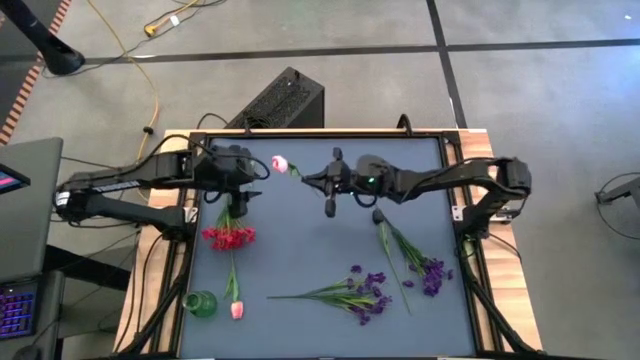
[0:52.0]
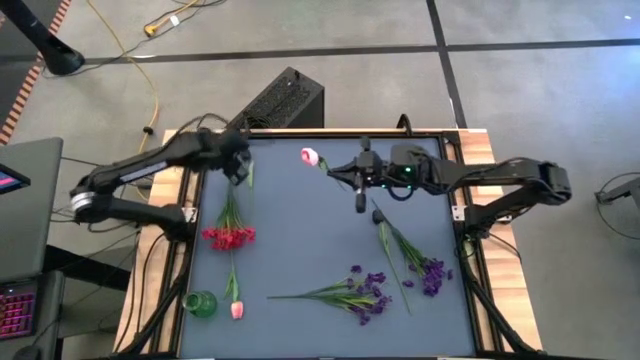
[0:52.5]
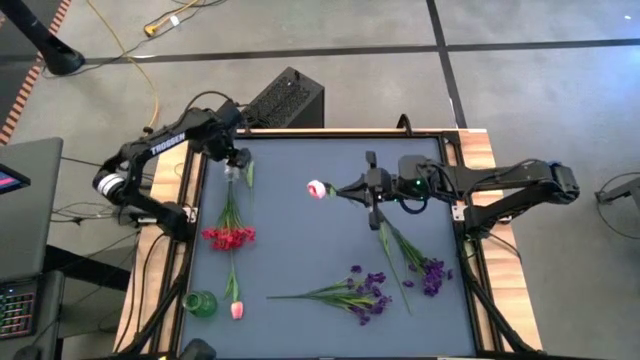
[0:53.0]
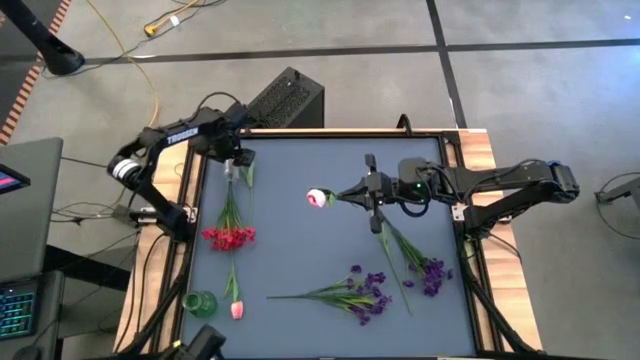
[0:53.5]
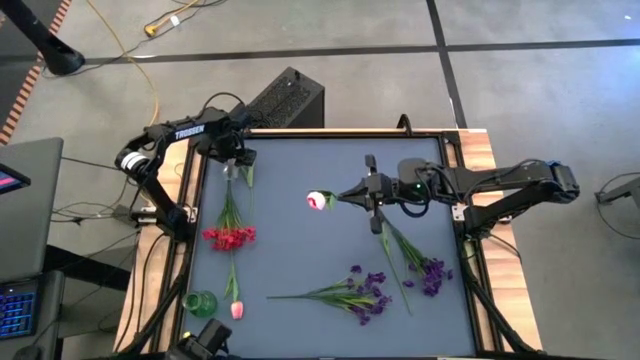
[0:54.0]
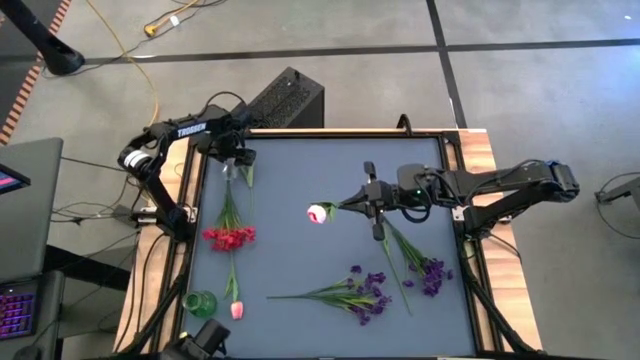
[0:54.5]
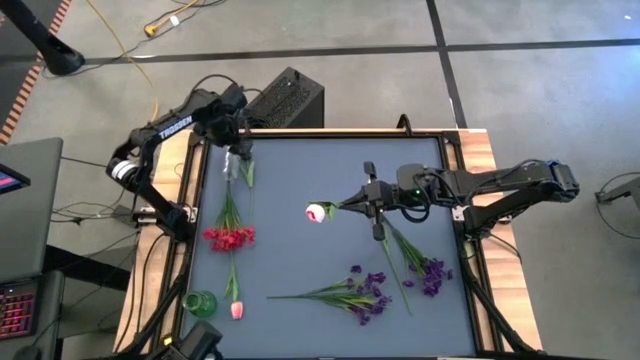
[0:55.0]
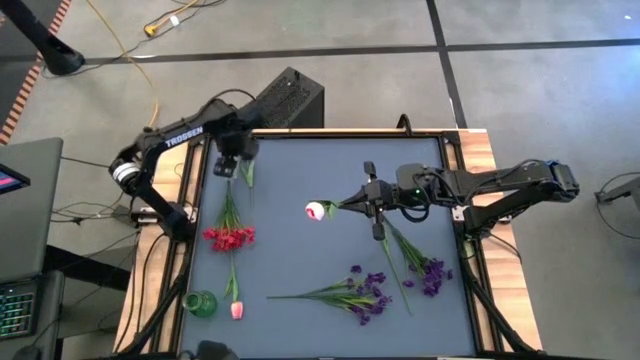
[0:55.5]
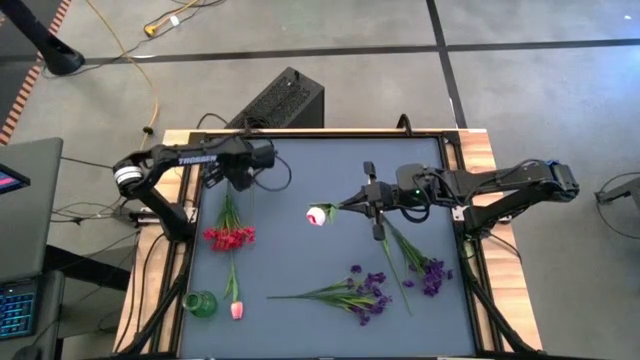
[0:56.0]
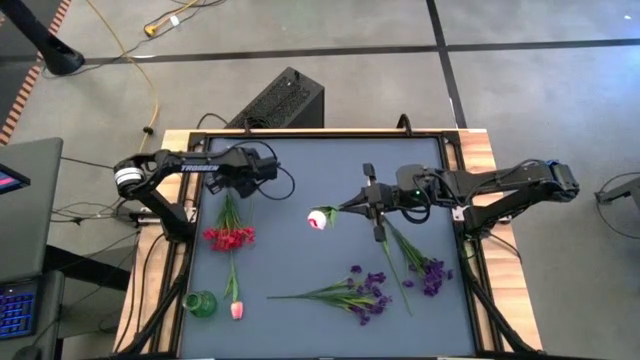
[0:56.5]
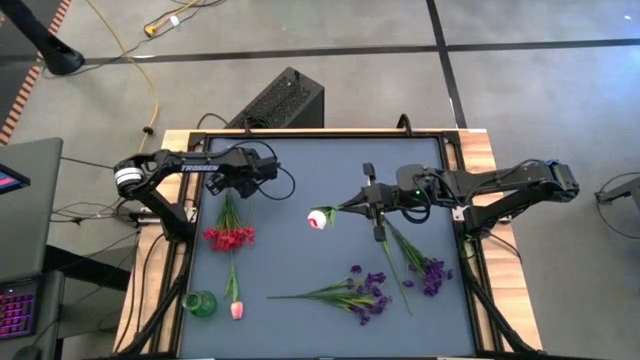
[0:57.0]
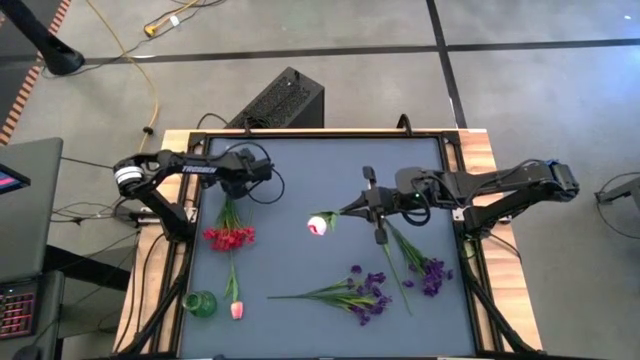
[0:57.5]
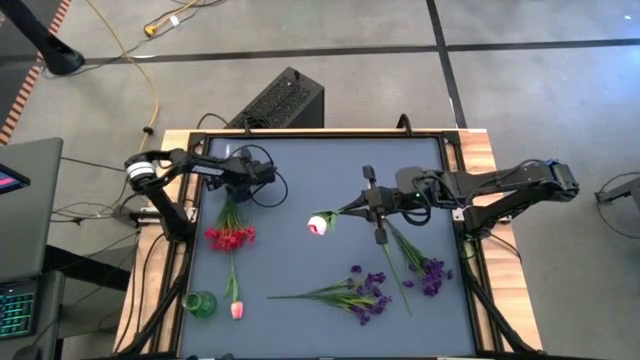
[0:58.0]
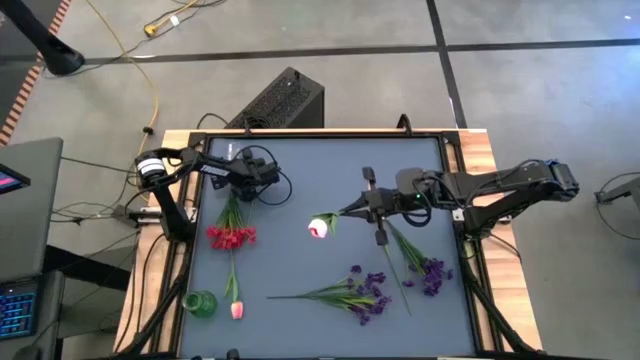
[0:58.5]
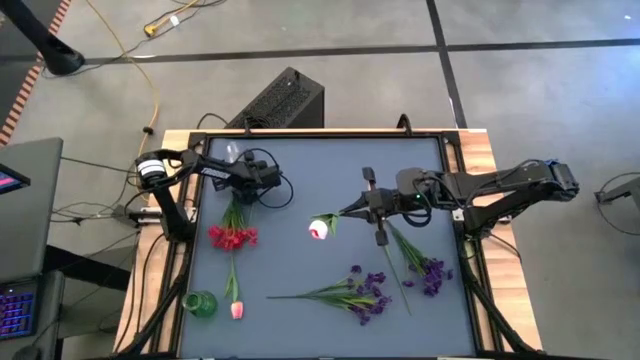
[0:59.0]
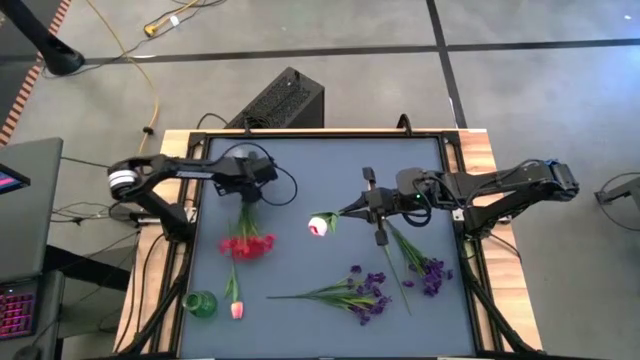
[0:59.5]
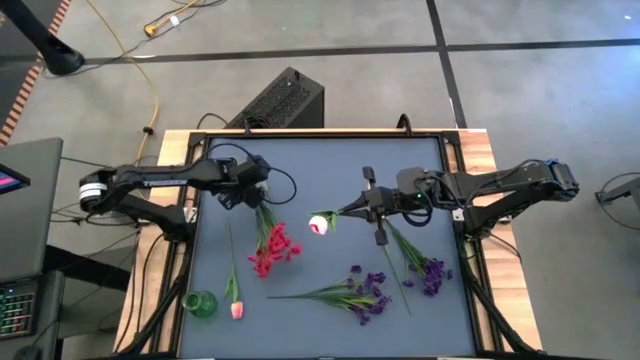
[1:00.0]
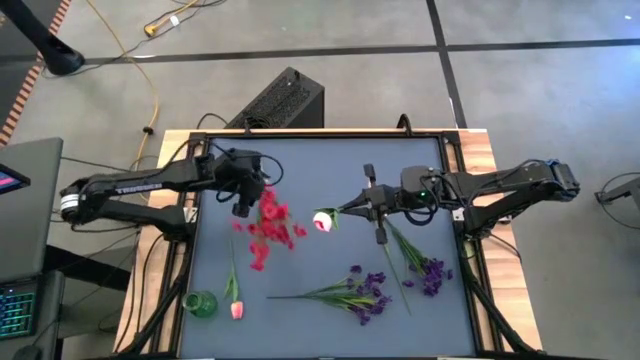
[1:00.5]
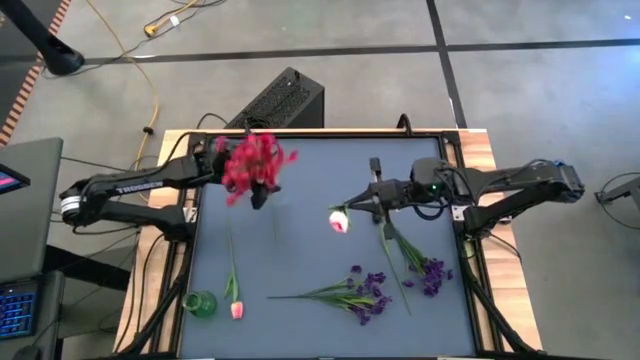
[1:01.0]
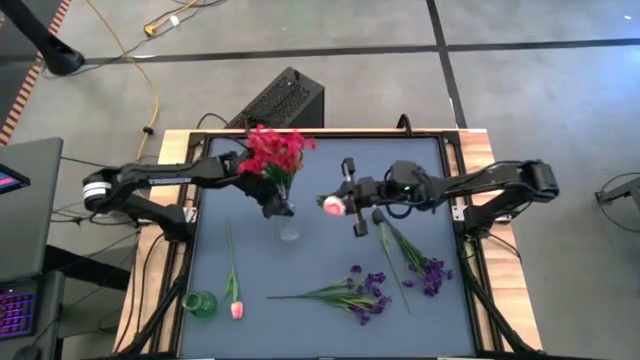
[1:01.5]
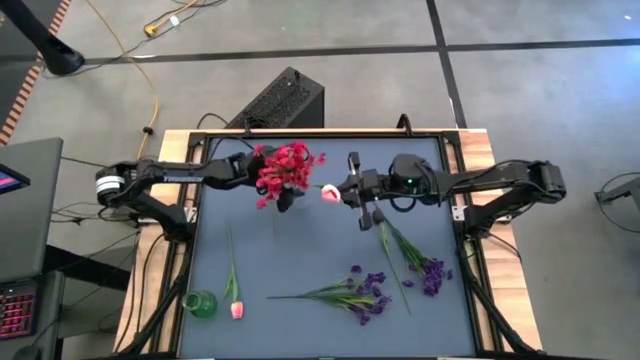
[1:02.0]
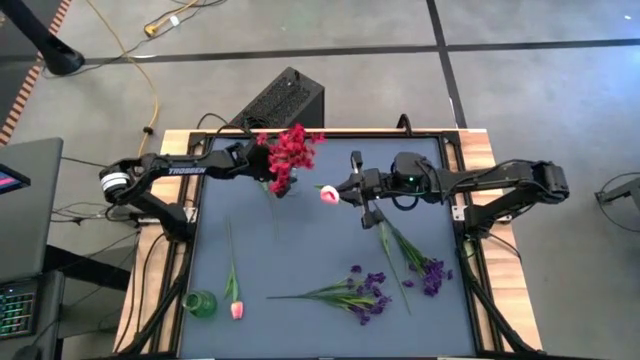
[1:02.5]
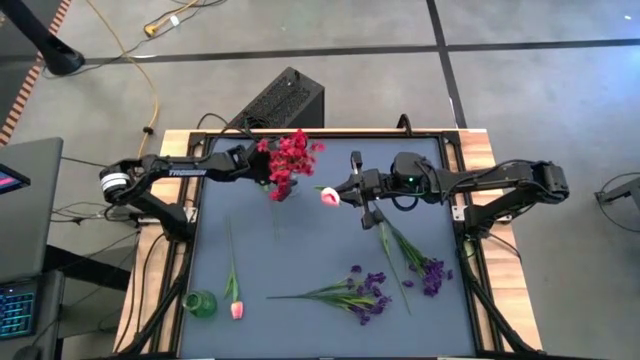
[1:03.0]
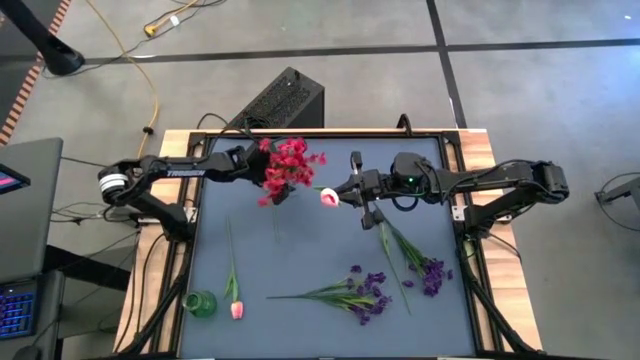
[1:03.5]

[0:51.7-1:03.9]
Task: Sort flowers into vase by color
Adjust the transparent vase on the table

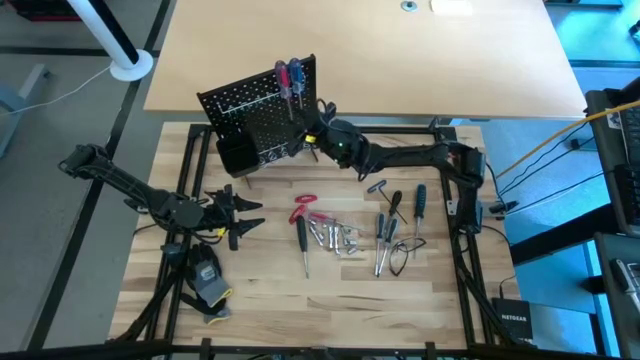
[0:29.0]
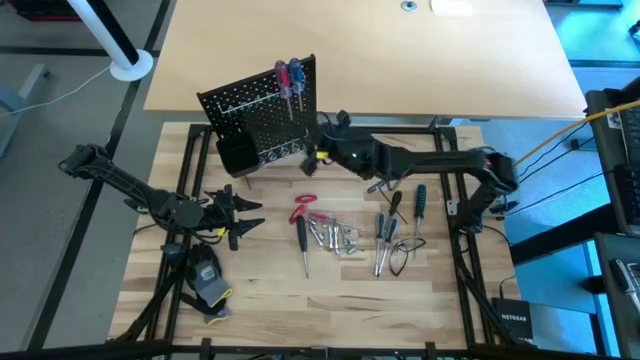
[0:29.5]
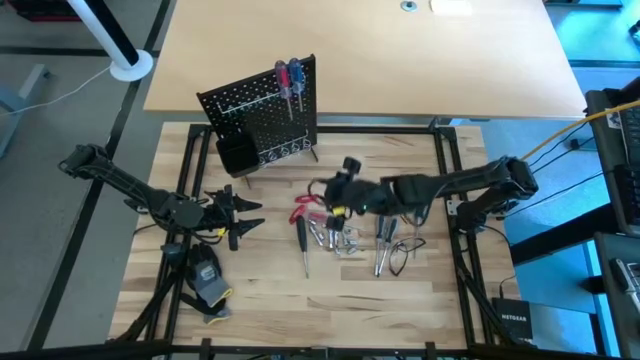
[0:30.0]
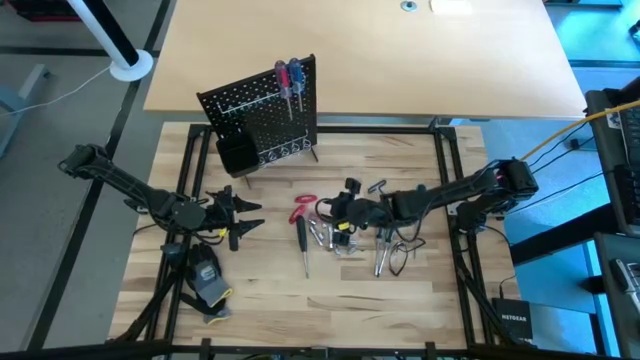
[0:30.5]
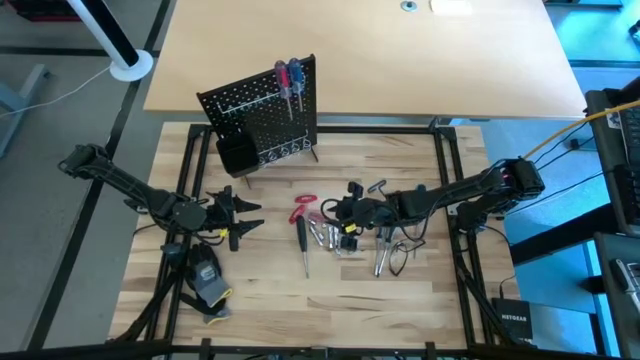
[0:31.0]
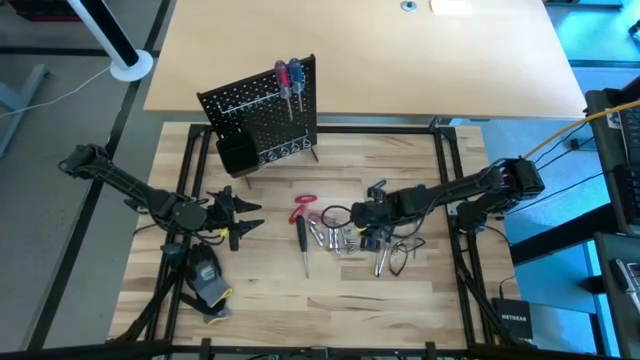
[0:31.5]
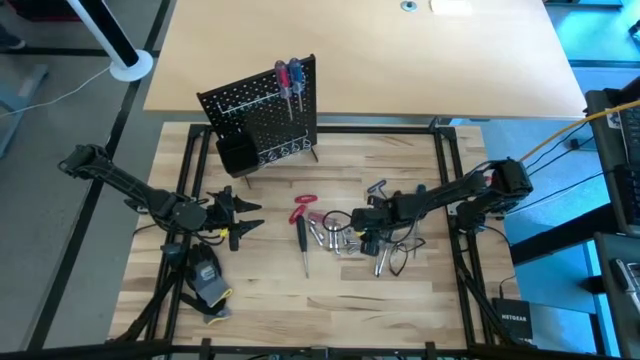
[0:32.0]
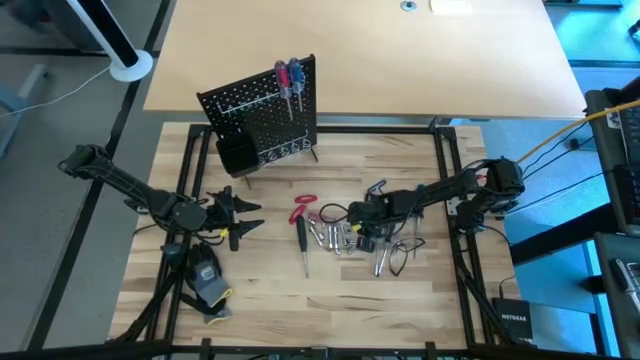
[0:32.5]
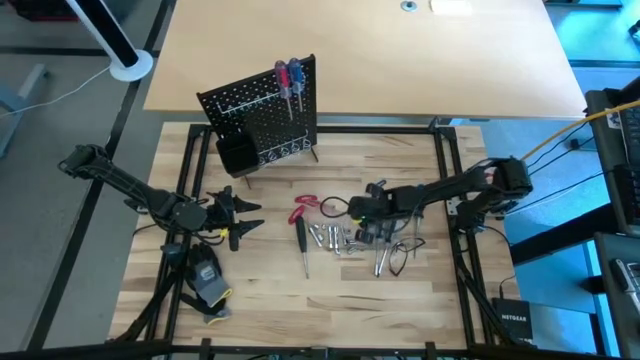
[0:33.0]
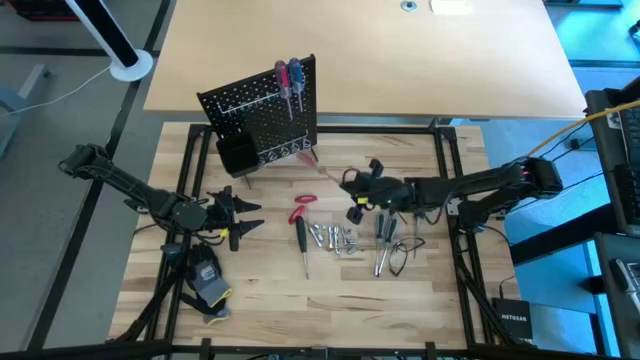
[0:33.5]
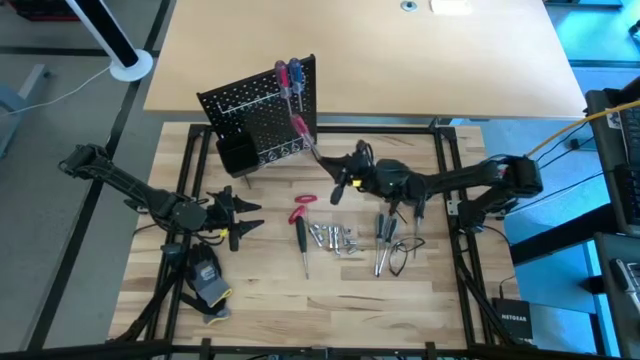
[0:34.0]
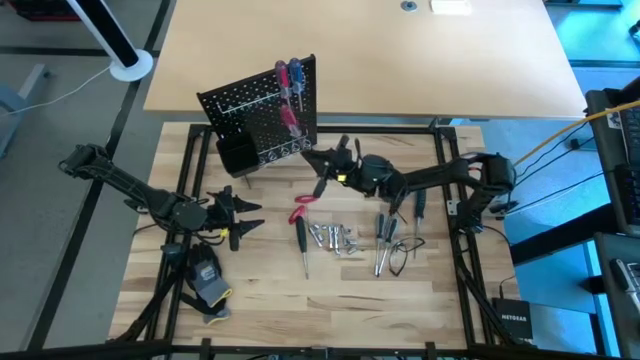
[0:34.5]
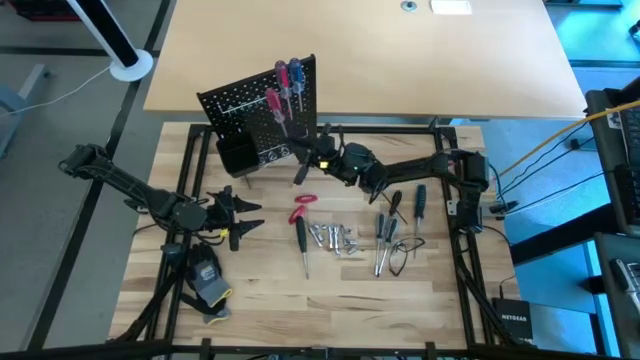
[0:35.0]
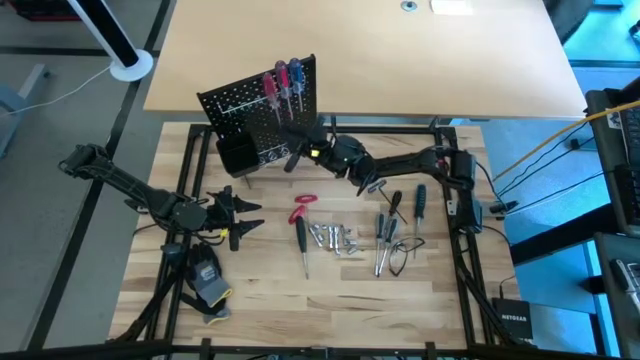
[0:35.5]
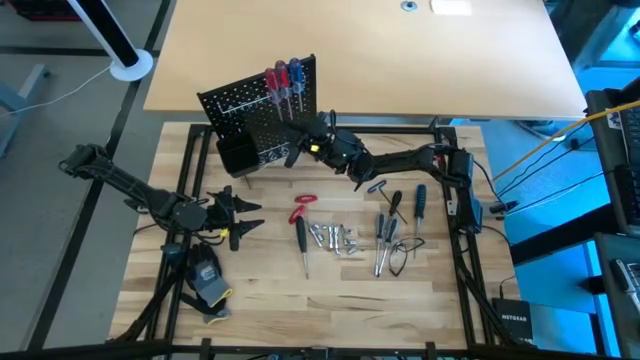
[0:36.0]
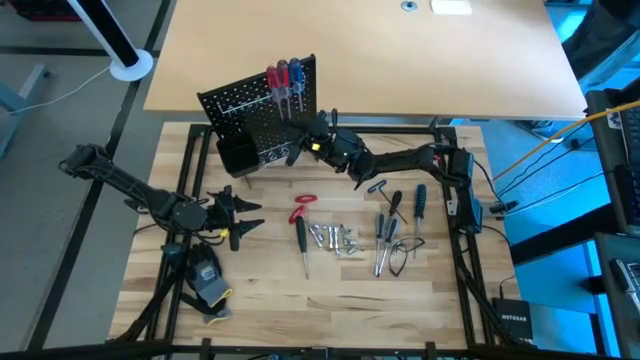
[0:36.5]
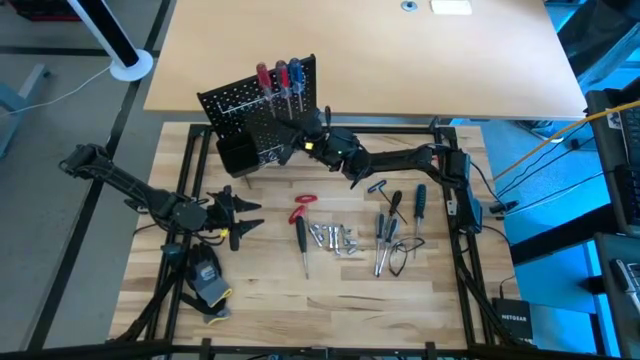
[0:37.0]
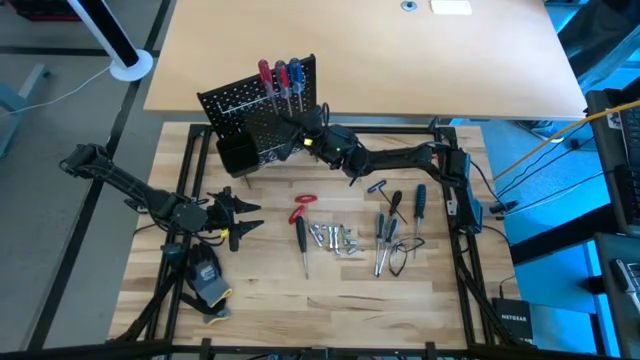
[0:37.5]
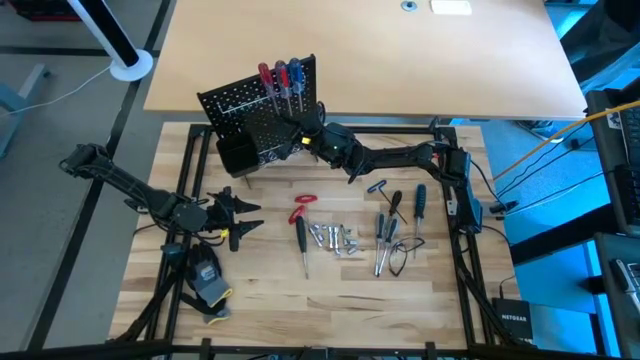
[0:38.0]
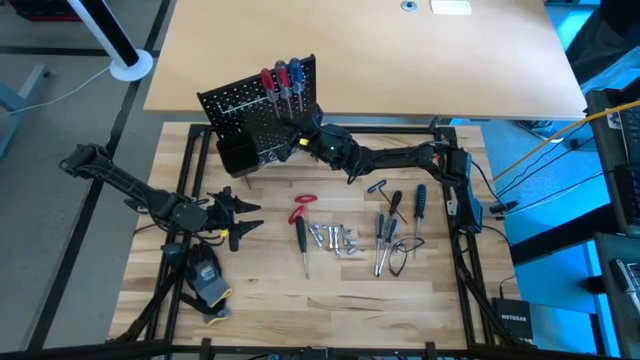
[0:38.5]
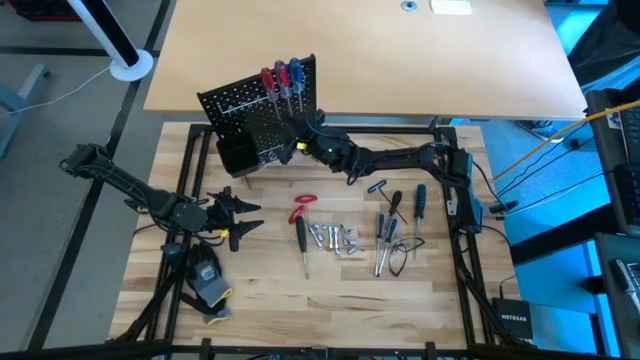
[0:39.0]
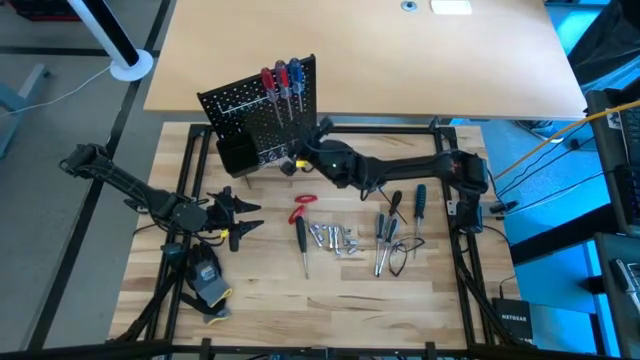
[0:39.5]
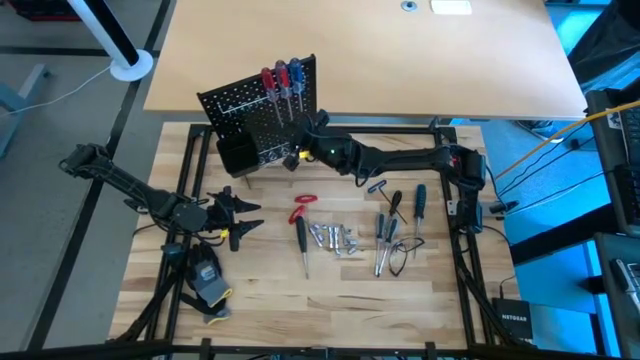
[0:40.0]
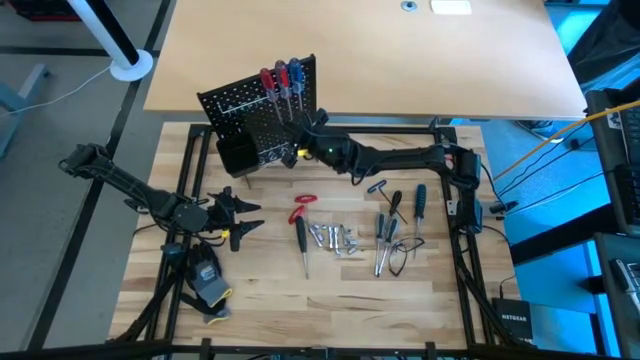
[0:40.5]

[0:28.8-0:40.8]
Task: Hang tools onto peg board
Hang the red screwdriver onto the peg board
